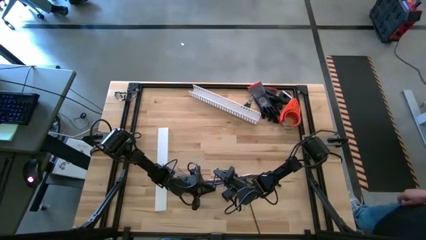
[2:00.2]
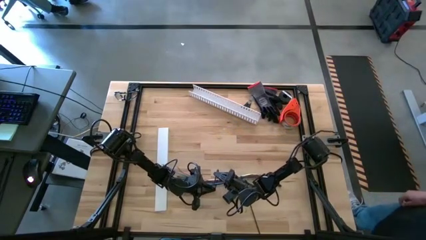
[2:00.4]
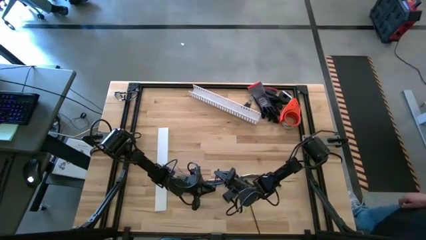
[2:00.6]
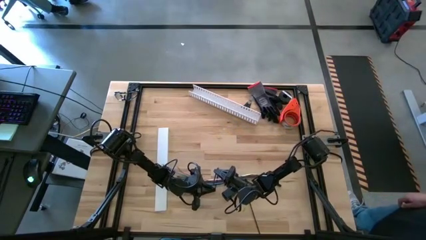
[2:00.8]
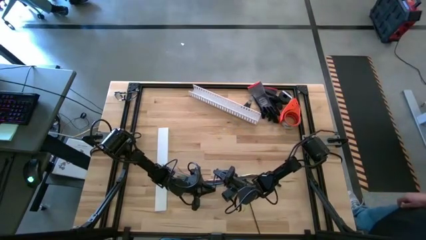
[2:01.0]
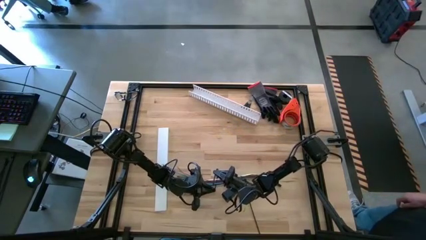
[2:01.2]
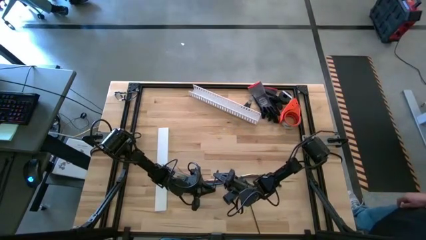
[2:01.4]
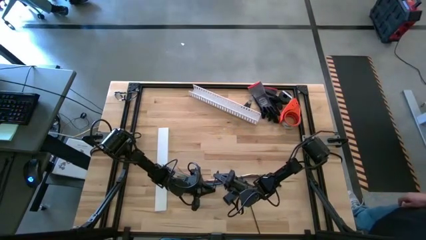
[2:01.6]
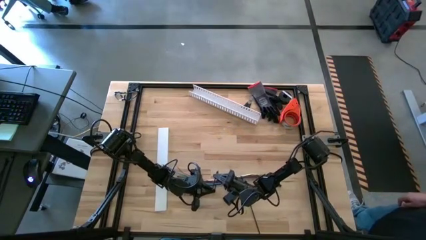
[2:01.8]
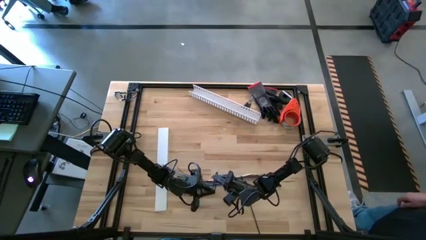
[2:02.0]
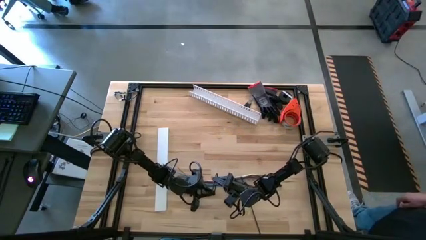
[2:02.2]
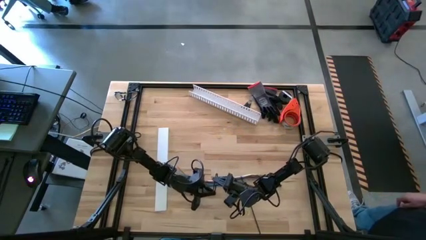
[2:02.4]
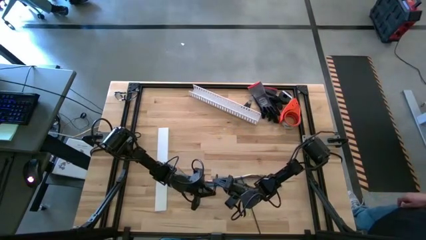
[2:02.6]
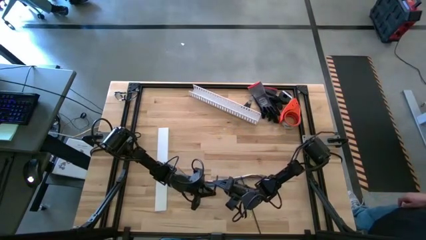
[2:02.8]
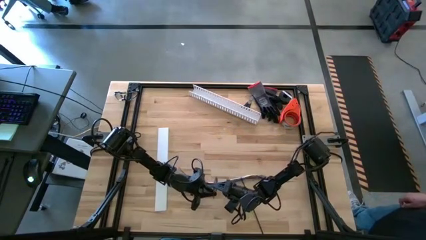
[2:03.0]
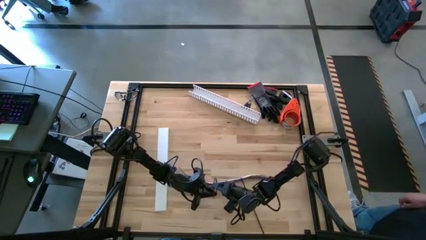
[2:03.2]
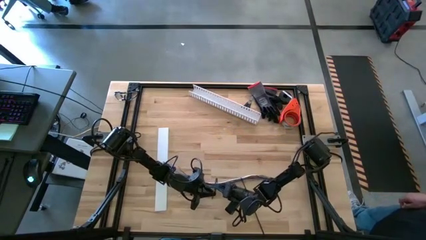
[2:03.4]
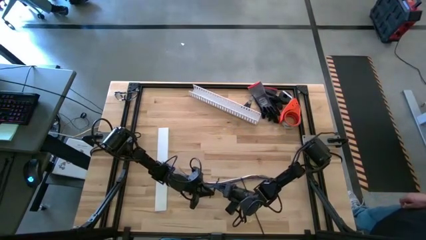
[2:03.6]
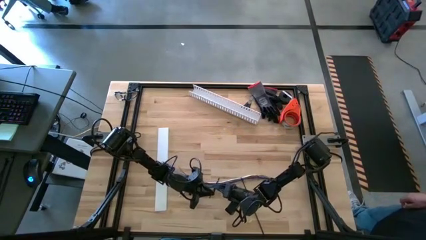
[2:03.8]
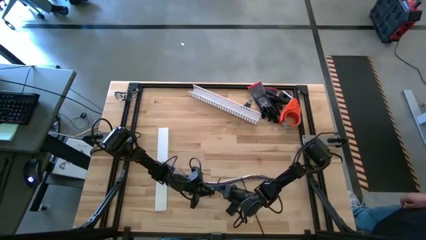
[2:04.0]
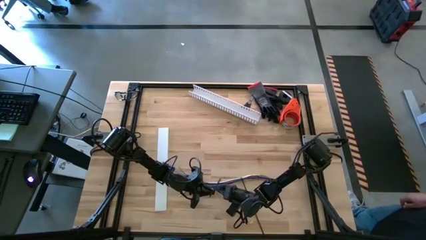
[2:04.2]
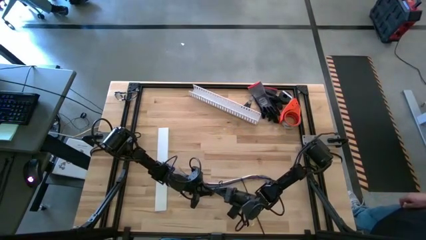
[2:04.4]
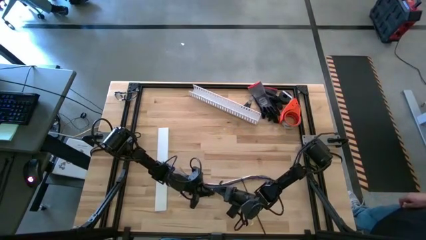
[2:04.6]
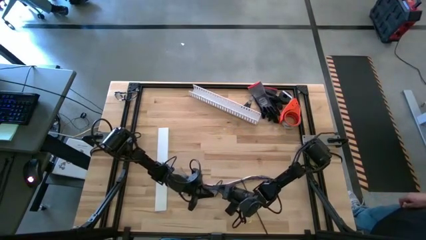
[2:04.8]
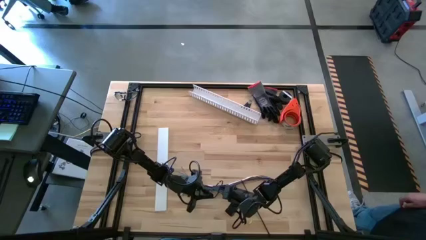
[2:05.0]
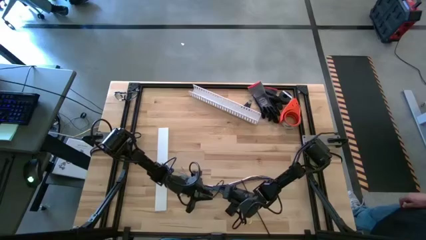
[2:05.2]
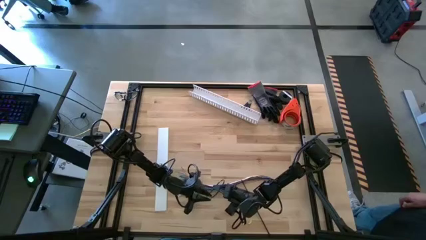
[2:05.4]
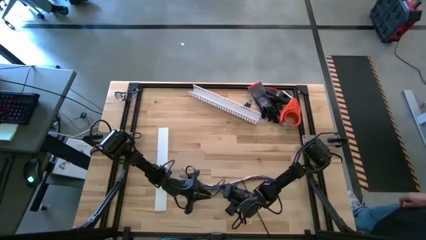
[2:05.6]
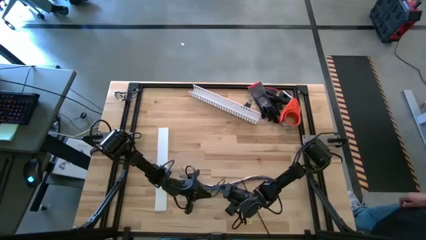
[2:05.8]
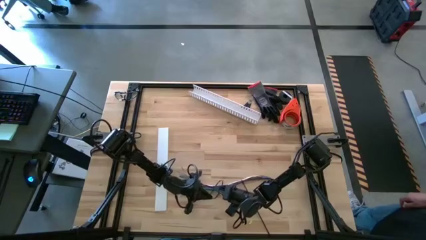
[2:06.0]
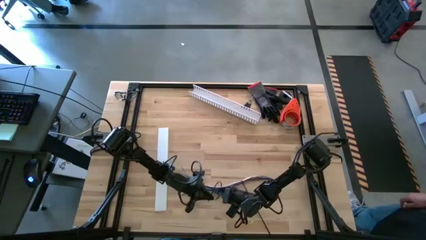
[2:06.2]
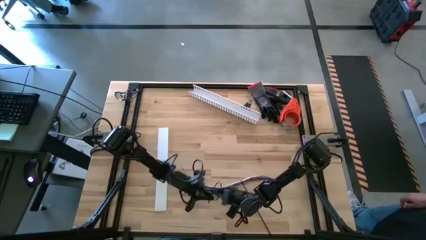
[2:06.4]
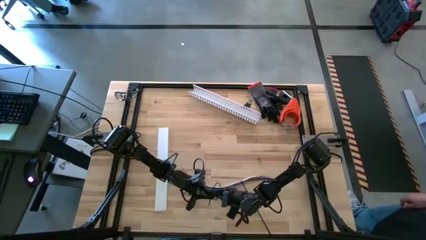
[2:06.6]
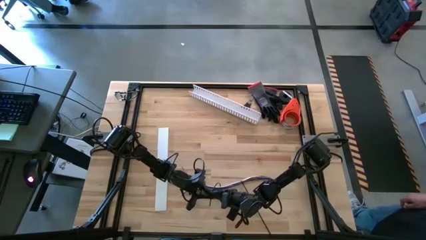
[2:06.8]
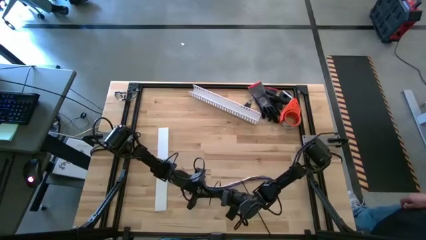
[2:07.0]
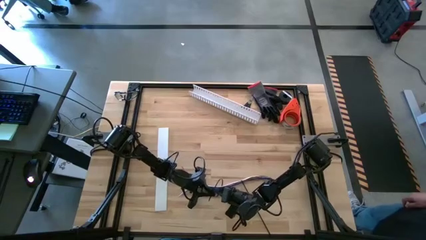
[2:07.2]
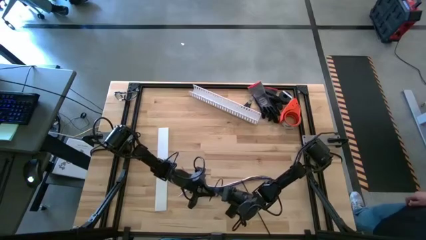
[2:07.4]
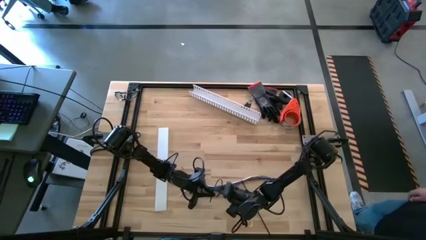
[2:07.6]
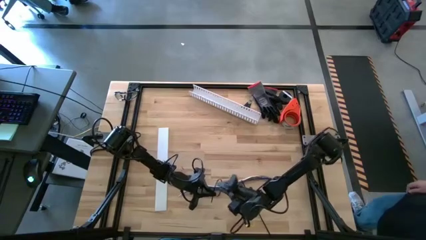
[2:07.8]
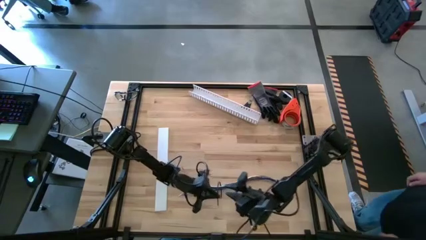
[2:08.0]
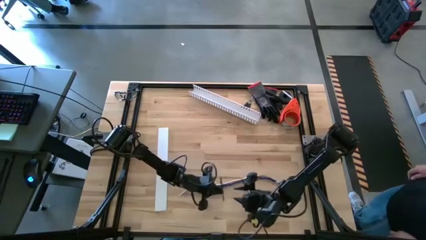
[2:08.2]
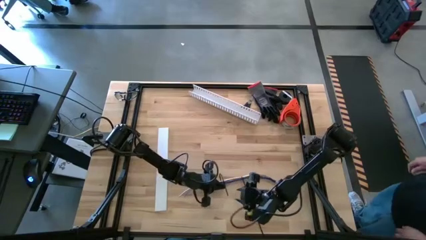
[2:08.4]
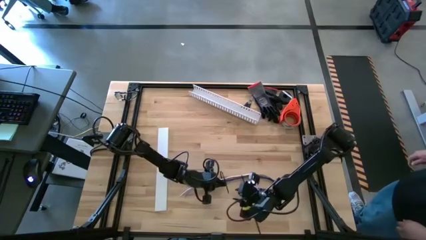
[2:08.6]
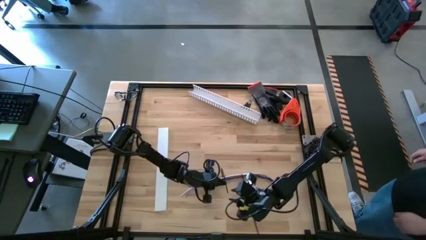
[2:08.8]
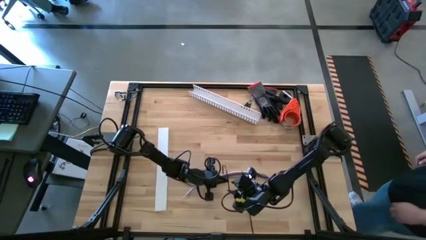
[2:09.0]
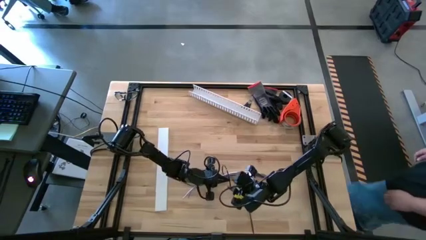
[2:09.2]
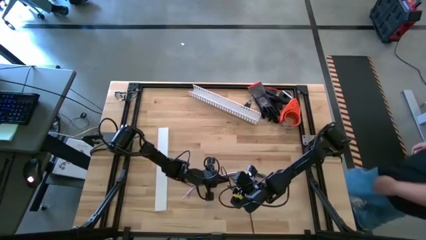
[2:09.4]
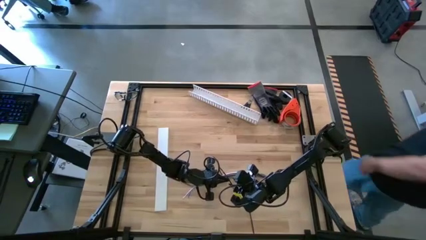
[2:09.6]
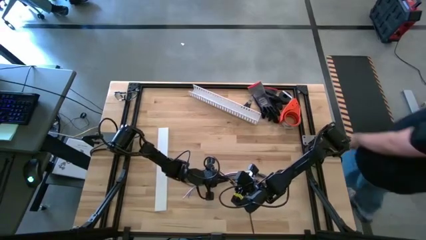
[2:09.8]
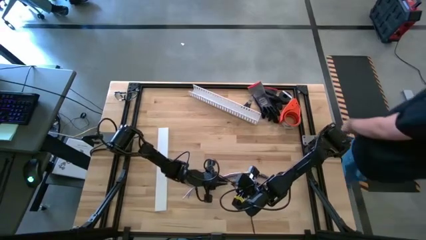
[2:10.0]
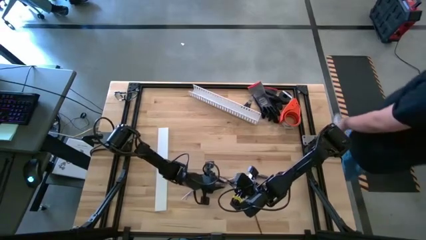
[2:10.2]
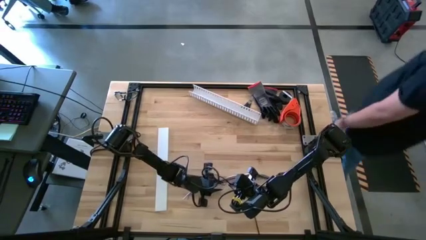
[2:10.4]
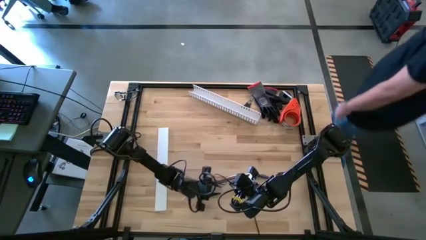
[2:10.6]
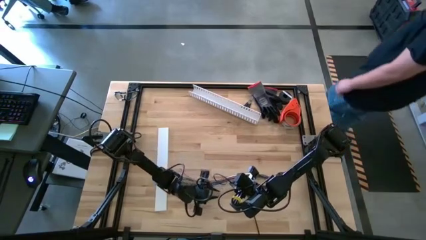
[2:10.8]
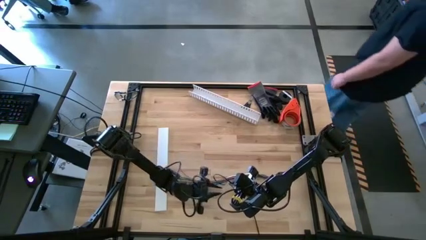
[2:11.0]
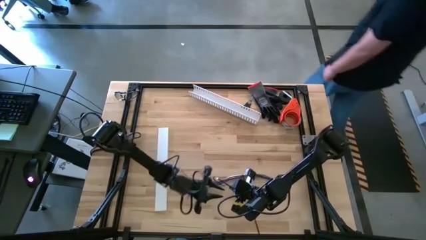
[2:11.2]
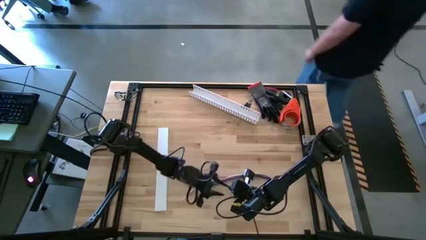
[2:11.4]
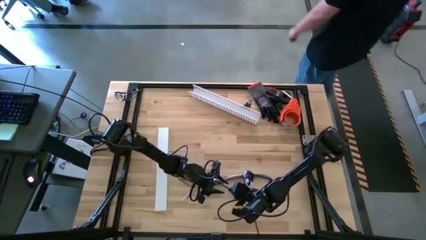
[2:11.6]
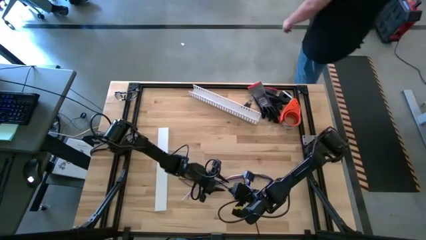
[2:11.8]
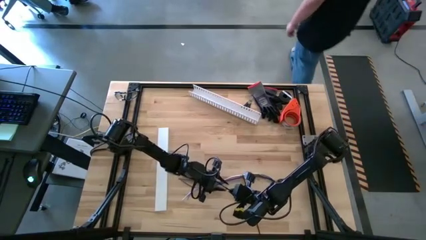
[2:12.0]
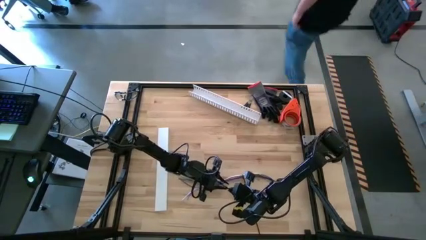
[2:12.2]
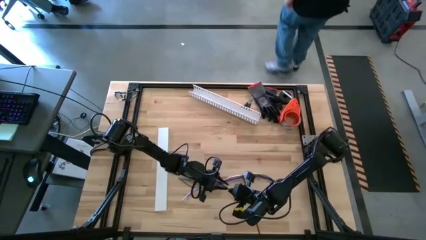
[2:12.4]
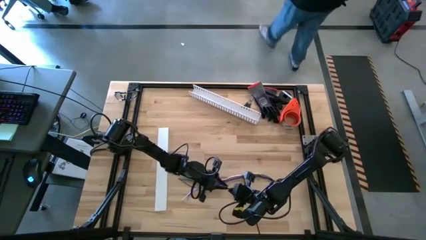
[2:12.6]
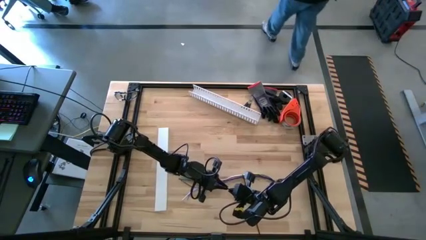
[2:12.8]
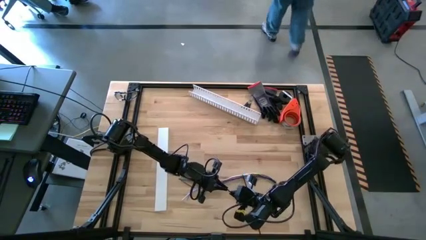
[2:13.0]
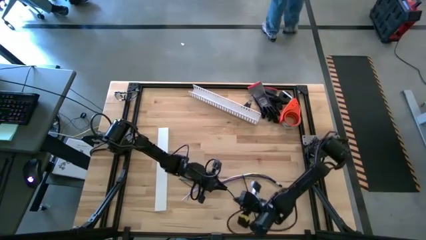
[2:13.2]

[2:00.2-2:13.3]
Task: Ziptie cables
Wrap the zip tie on the cable

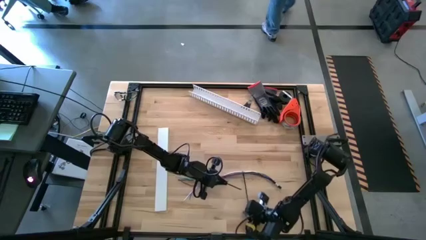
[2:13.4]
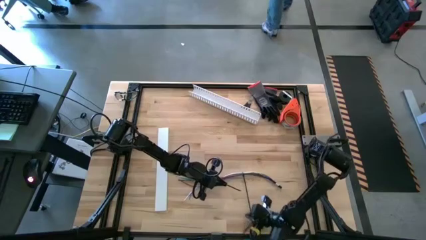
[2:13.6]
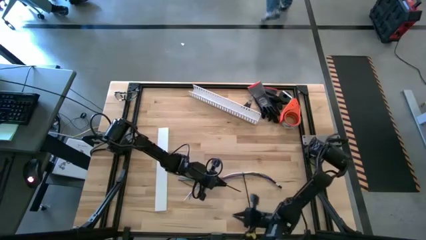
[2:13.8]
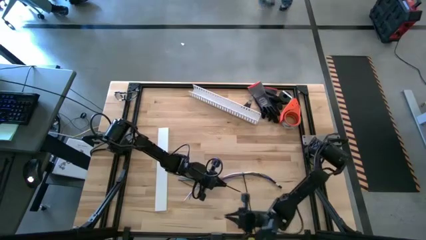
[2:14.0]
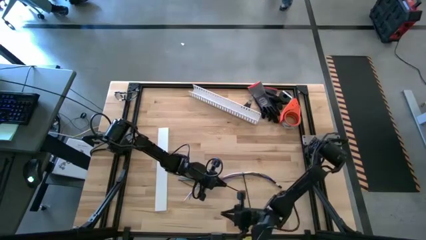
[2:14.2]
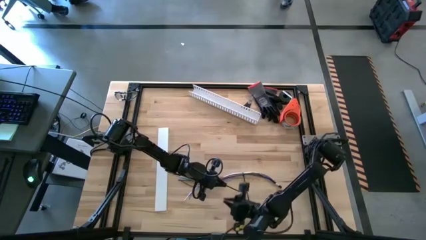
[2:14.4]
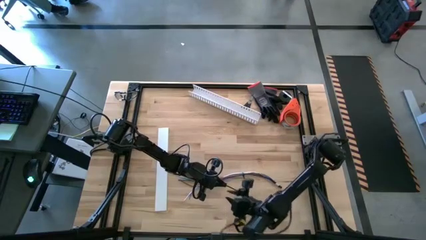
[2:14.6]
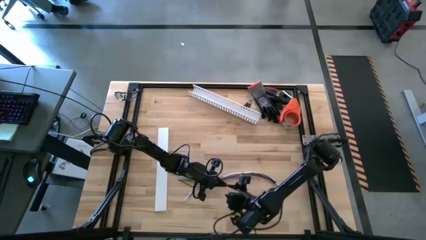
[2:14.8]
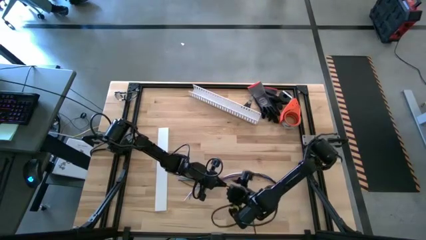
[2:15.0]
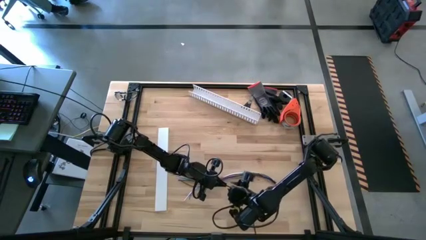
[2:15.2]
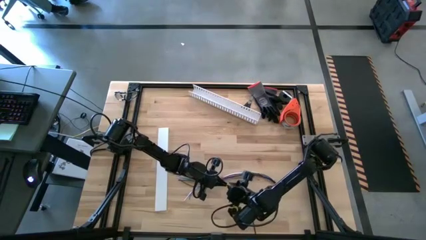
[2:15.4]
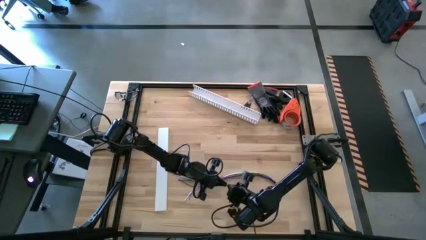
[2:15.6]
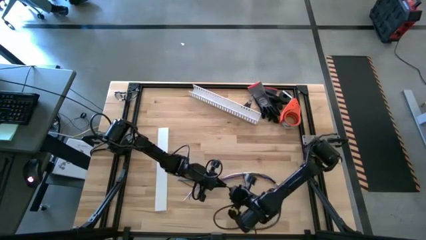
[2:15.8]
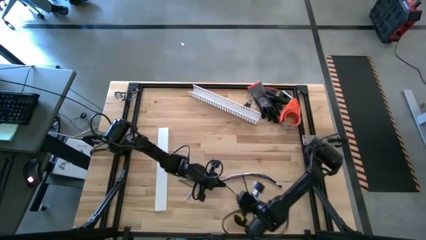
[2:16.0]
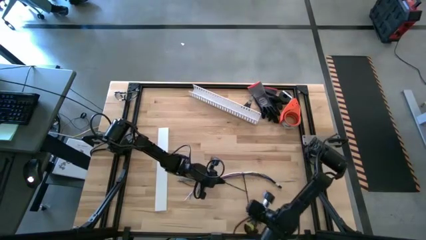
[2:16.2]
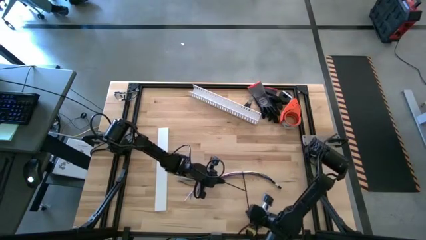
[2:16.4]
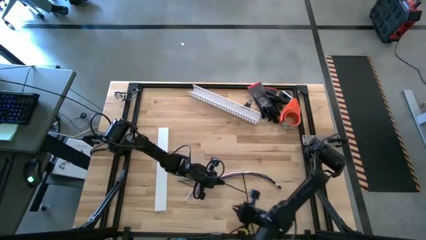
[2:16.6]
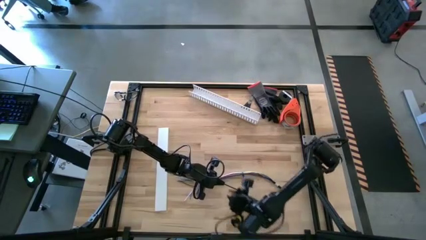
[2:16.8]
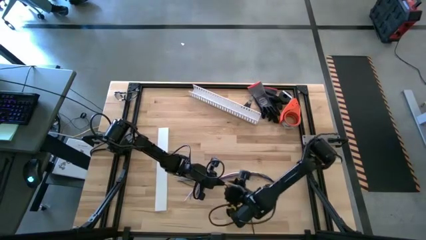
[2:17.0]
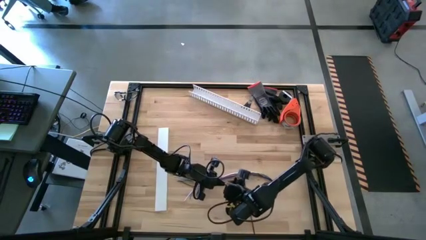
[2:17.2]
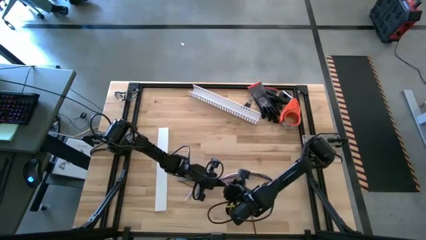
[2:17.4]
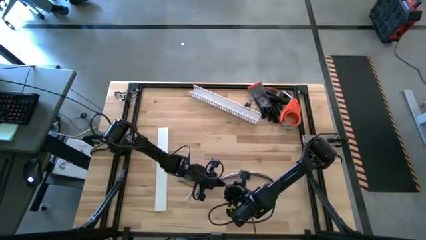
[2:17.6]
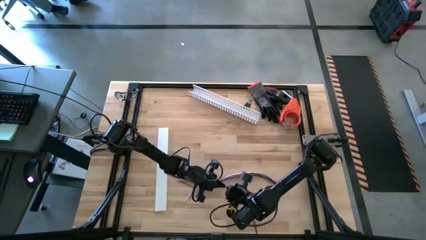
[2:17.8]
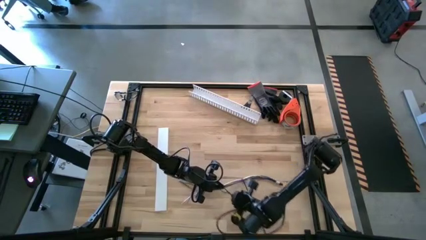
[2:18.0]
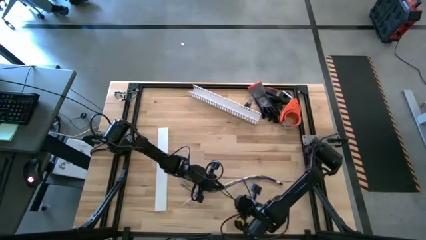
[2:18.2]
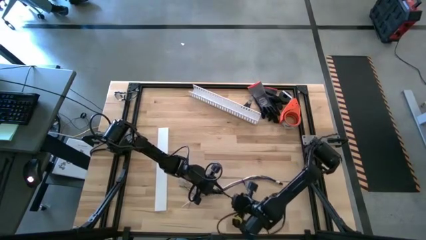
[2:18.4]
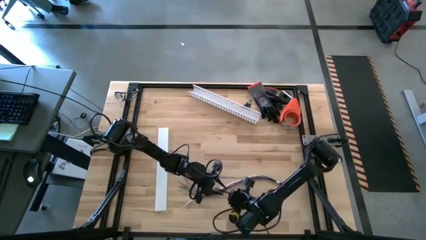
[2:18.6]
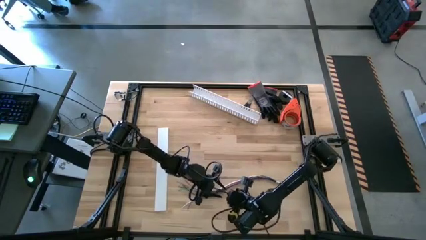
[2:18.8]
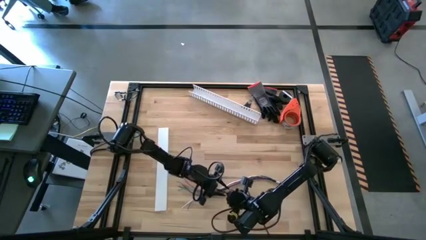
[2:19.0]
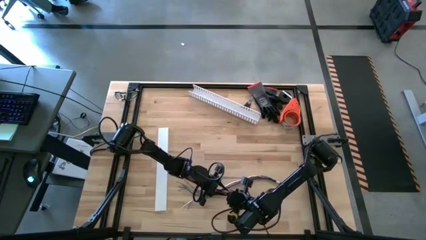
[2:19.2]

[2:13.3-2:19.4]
Wrap the zip tie on the cable
